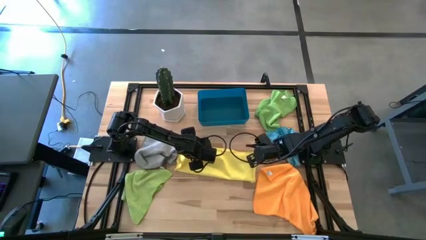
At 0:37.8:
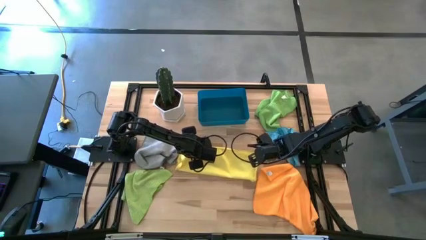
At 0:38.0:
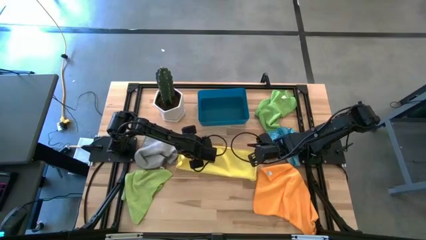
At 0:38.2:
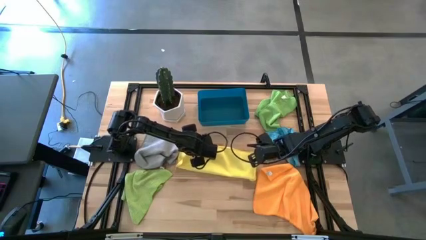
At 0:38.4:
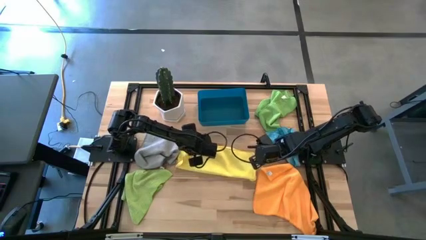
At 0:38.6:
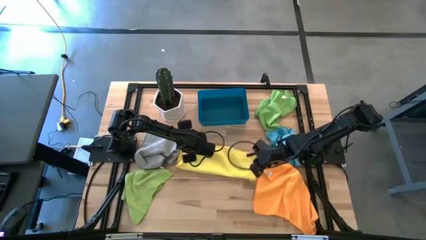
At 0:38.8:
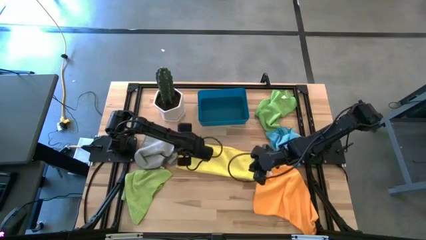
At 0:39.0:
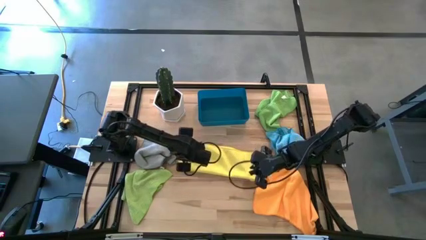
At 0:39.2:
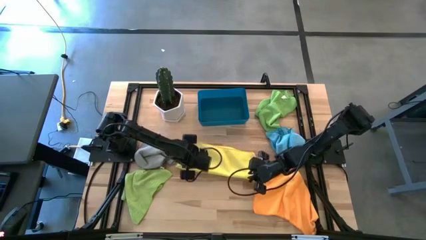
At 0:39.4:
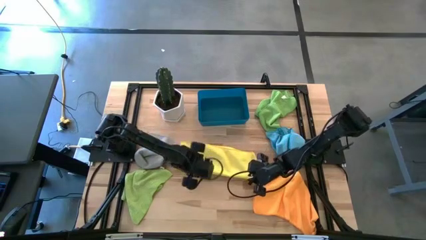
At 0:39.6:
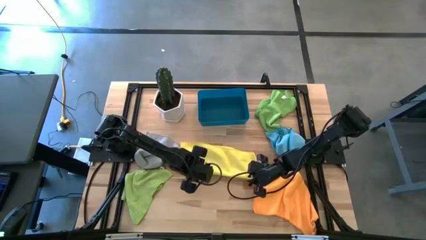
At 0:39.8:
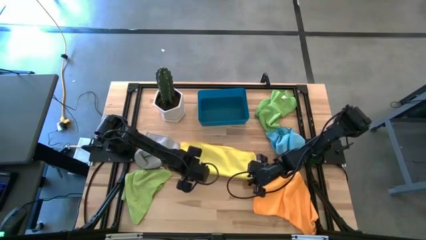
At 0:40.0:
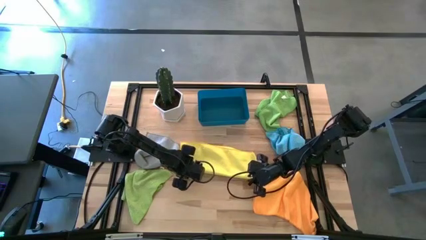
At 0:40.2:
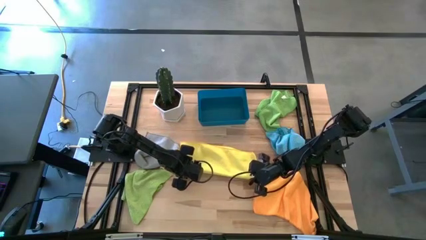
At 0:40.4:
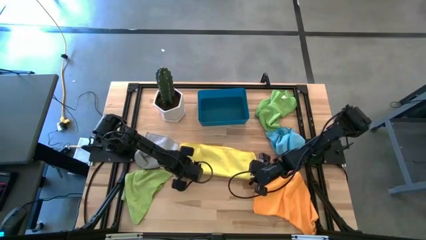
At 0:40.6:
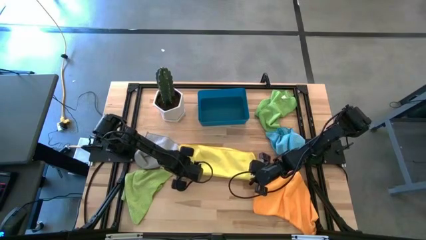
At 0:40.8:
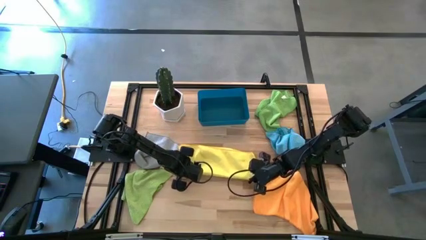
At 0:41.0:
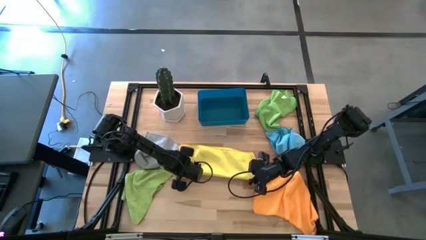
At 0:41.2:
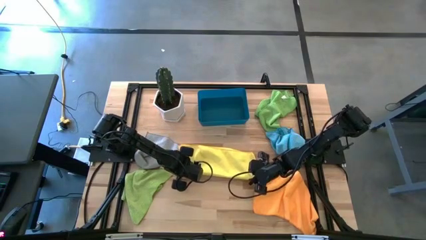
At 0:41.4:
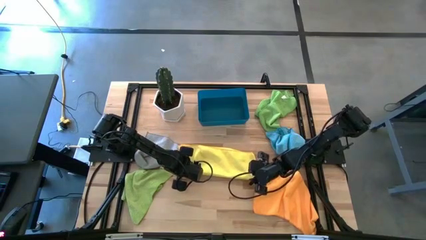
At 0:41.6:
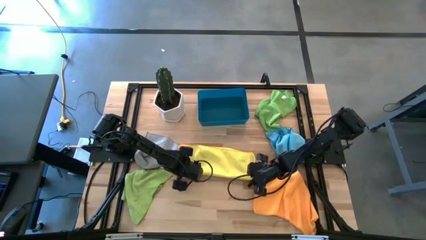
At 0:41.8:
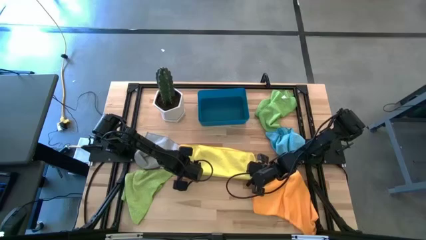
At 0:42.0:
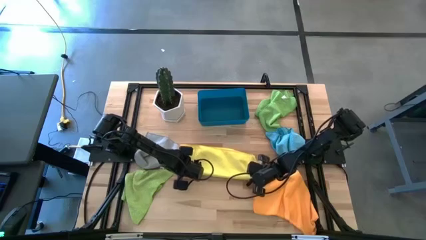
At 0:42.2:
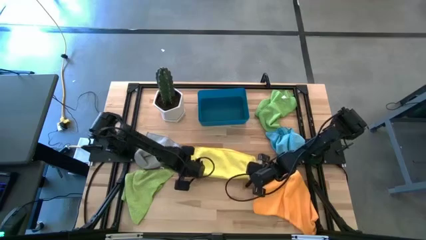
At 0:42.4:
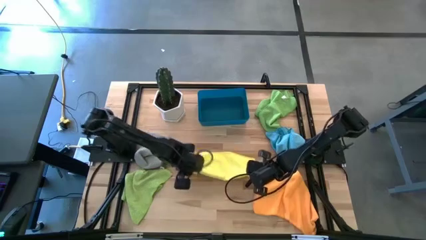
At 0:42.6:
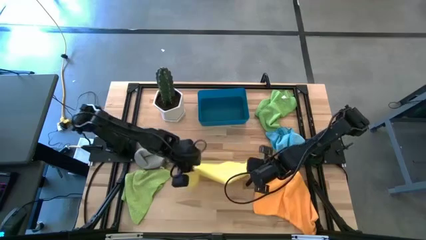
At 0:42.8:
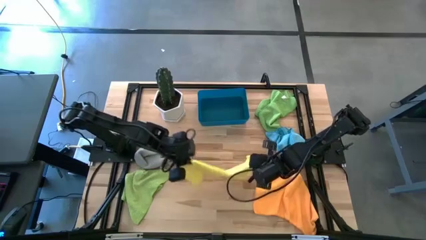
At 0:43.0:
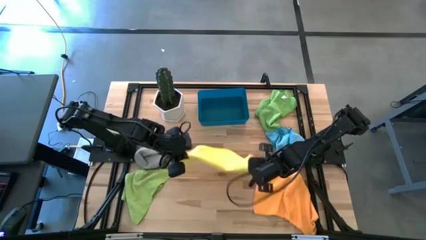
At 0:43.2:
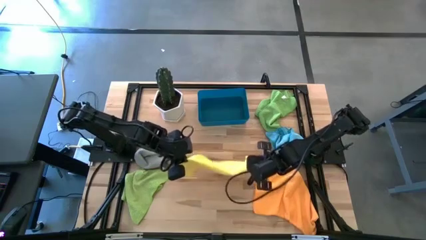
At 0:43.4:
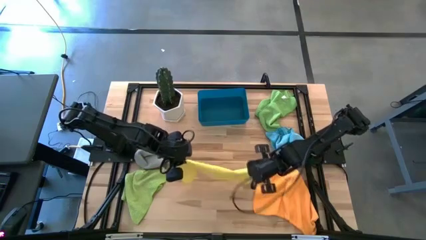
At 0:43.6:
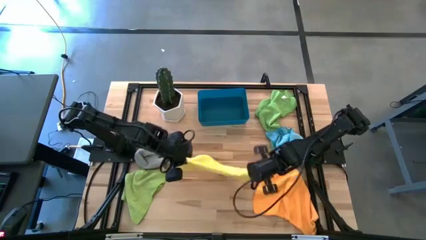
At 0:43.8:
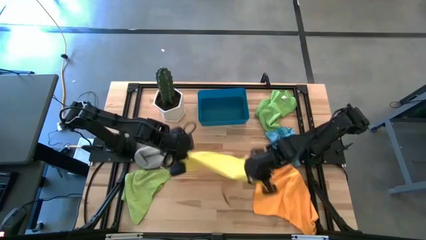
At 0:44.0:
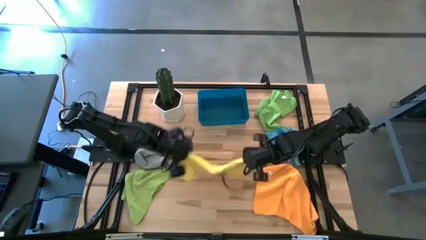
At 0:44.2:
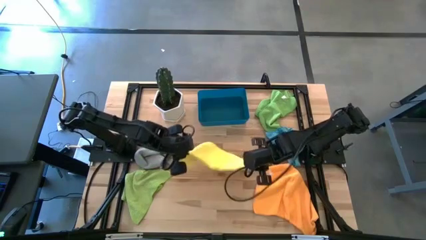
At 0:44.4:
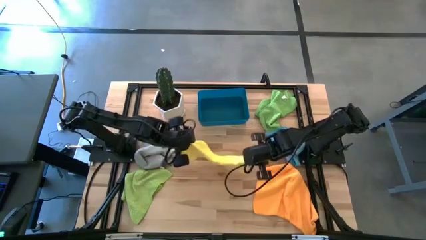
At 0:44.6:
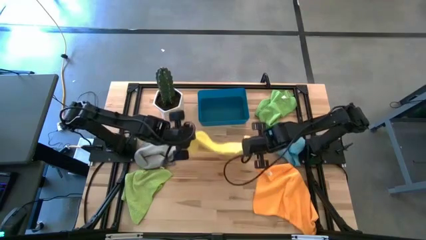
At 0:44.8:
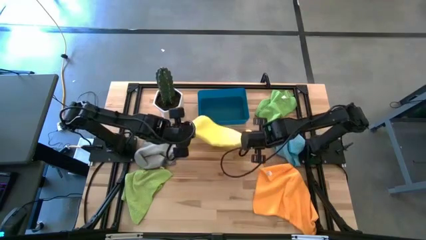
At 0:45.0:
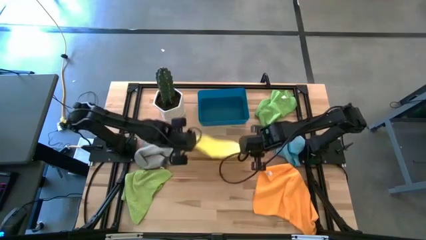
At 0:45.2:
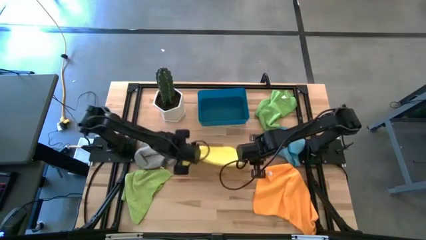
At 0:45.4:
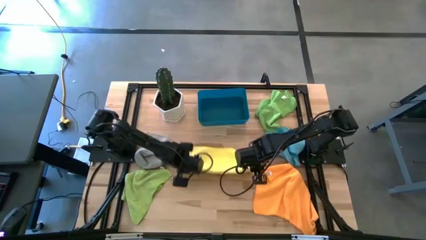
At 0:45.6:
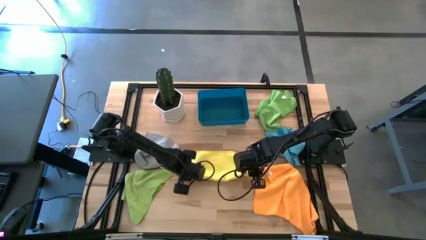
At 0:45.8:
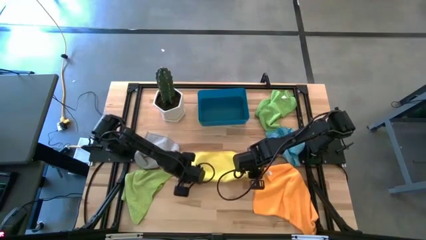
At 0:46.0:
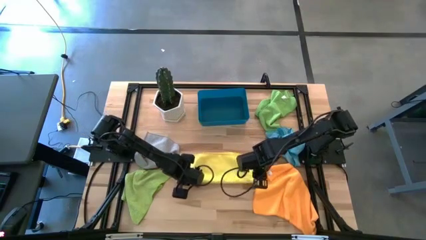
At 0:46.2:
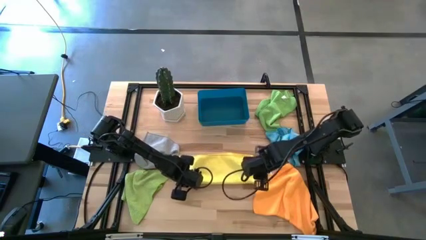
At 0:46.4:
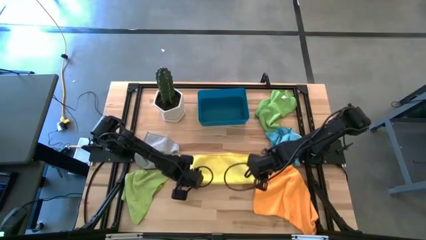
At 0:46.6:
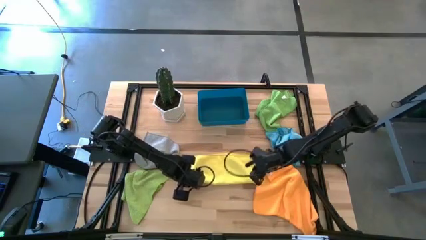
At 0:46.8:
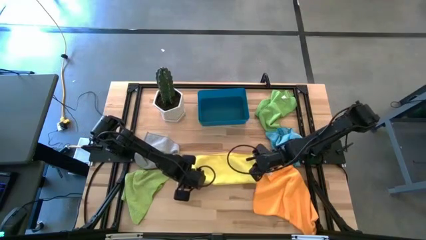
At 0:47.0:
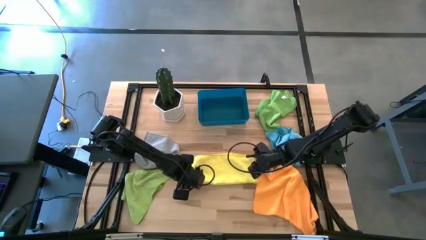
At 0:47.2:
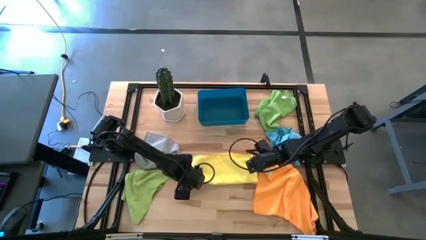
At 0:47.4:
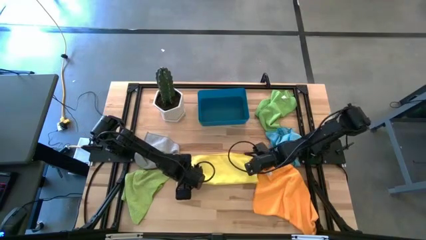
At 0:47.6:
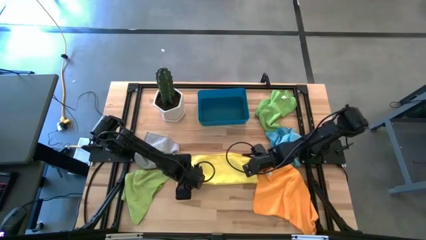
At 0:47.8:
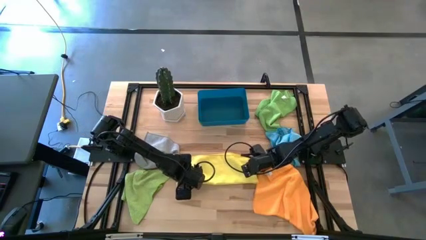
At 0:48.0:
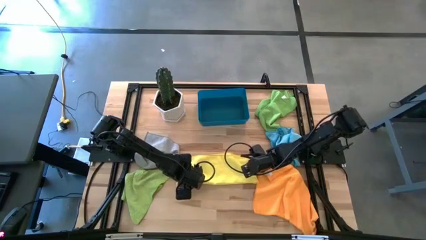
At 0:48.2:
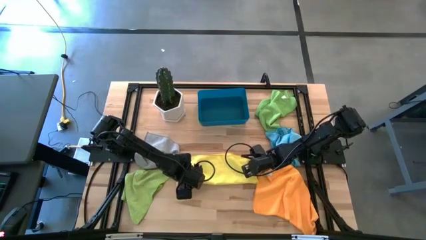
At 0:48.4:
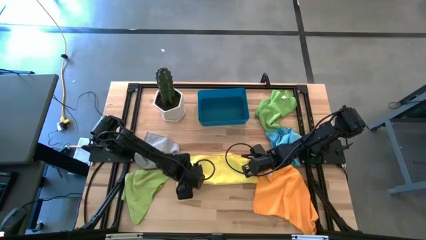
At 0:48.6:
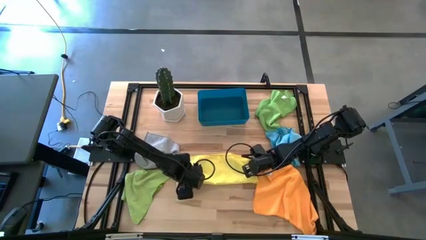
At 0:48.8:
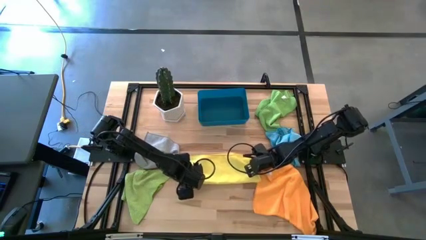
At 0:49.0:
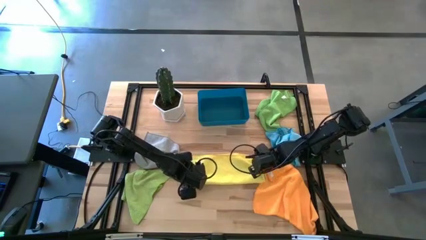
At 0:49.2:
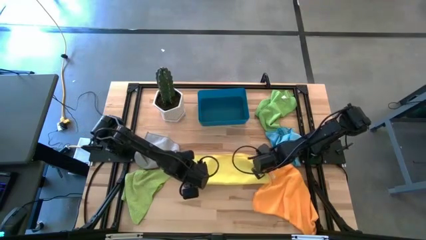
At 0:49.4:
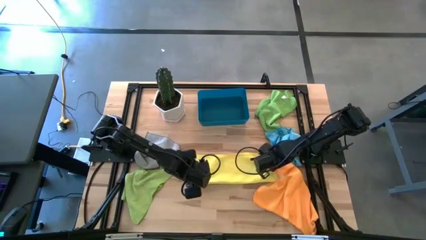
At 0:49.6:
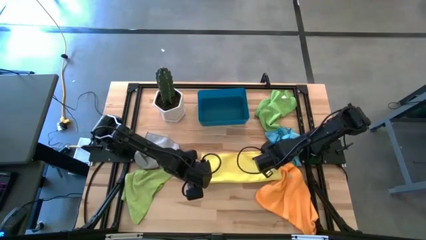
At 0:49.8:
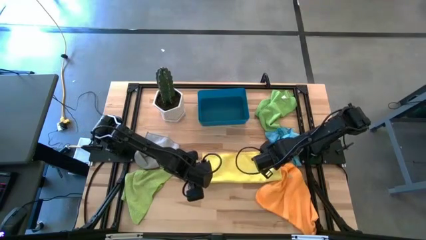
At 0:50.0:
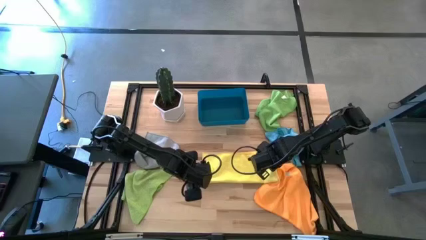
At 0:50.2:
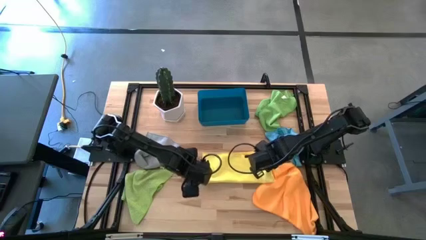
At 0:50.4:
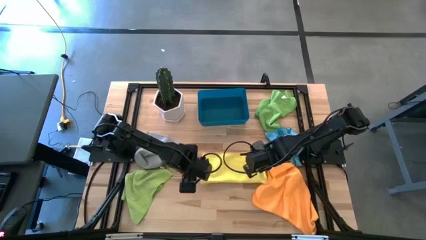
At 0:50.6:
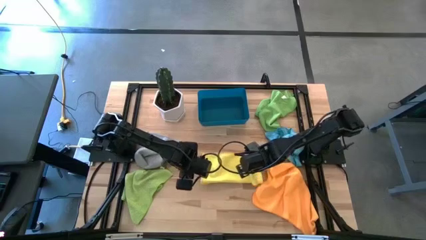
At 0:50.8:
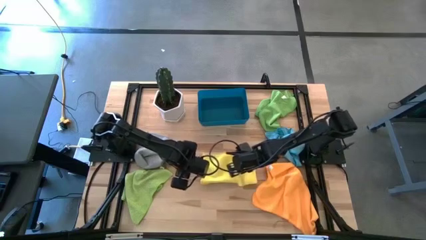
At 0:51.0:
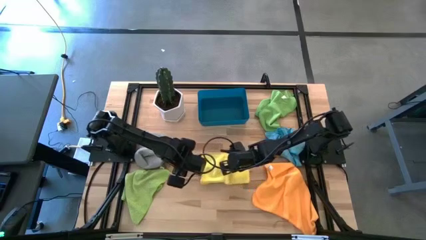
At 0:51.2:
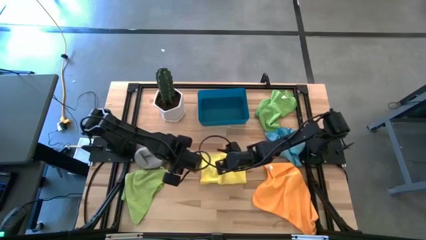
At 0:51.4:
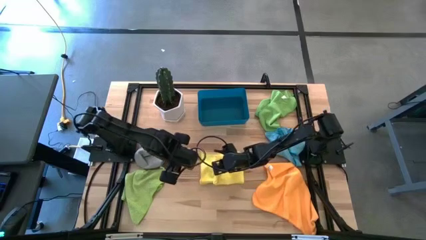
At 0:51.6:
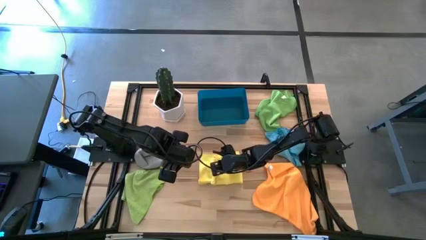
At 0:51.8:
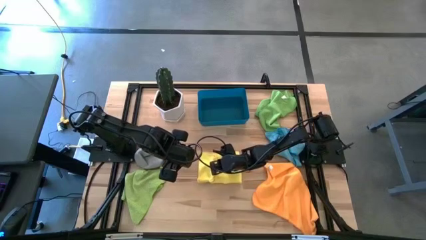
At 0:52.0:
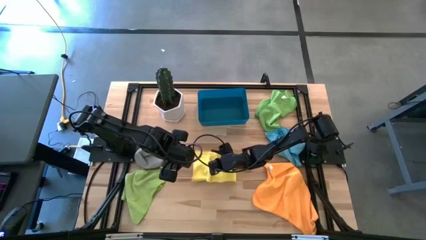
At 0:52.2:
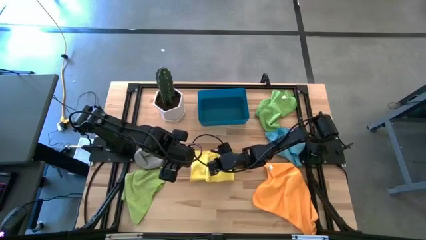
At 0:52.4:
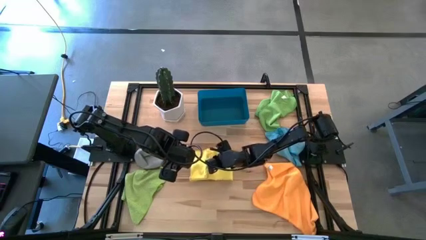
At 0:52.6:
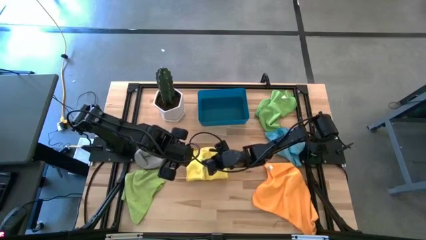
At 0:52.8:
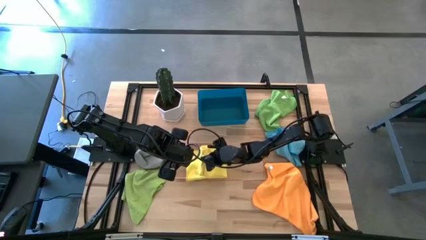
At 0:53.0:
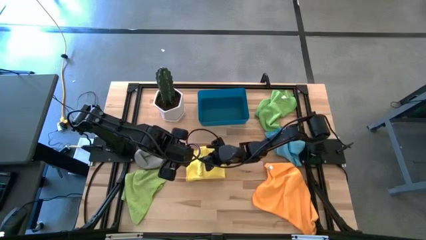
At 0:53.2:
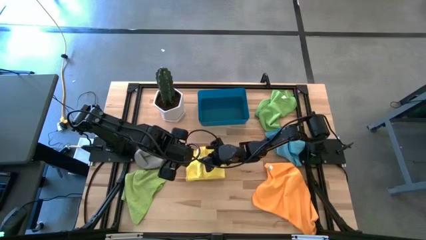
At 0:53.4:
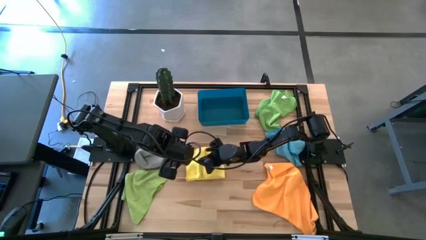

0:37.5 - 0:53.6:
Task: Fold microfiber towels
Fold the yellow microfiber towel
